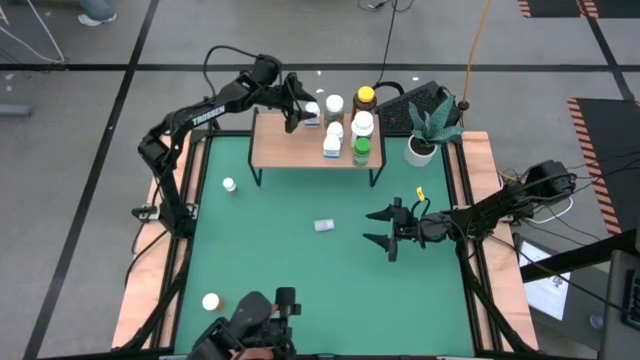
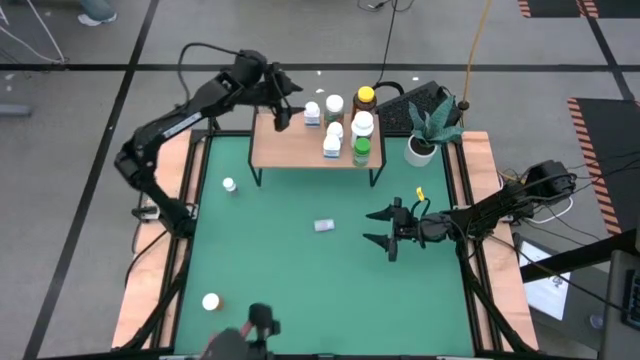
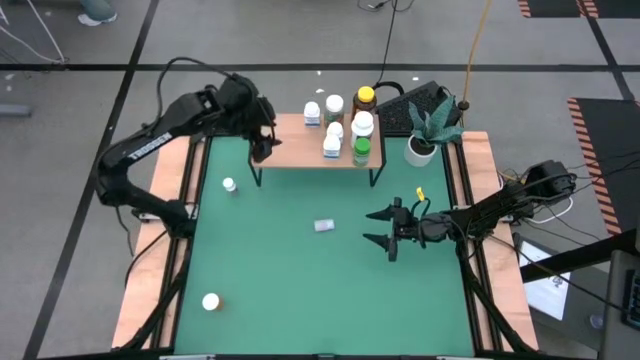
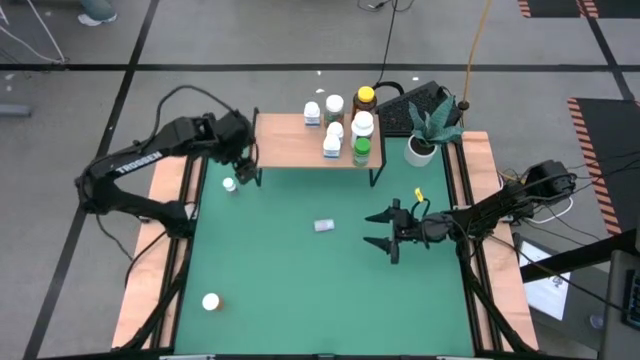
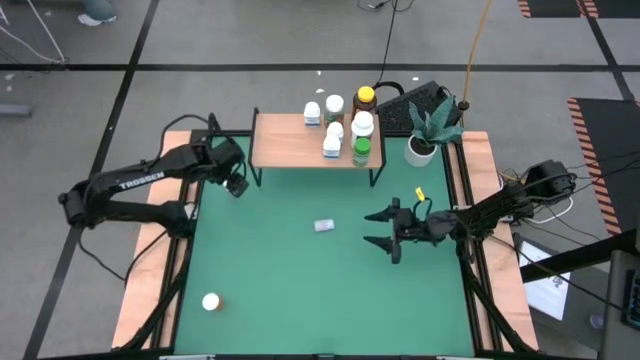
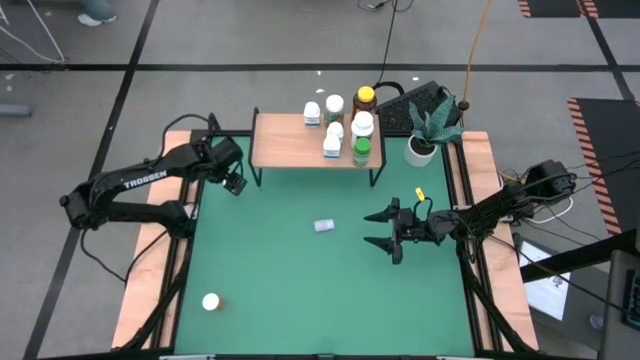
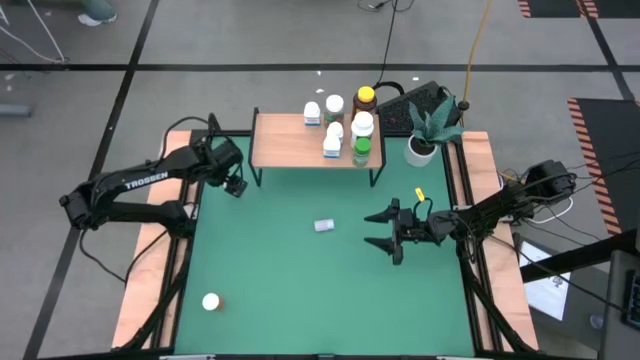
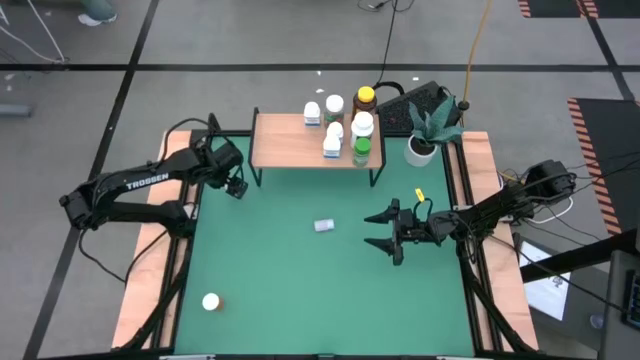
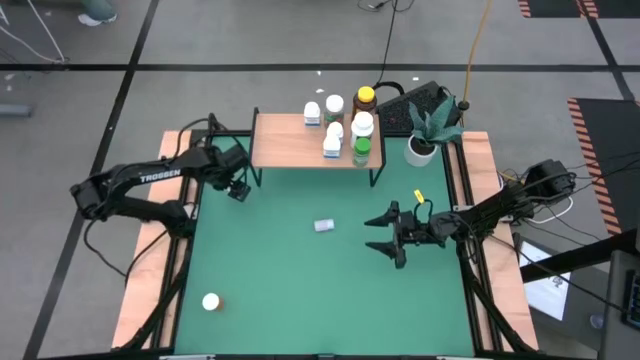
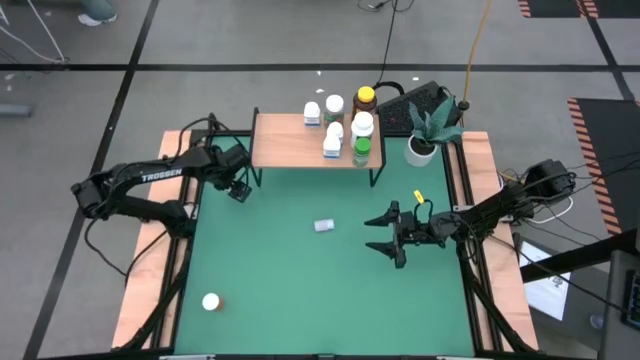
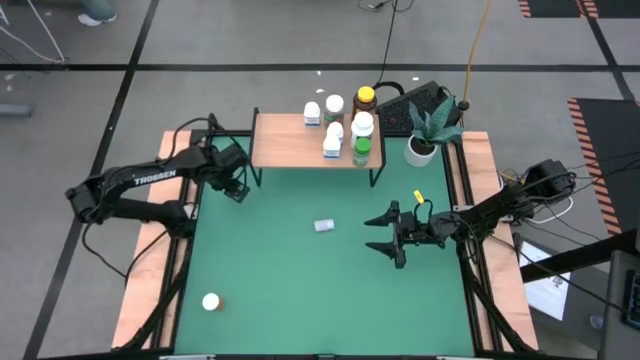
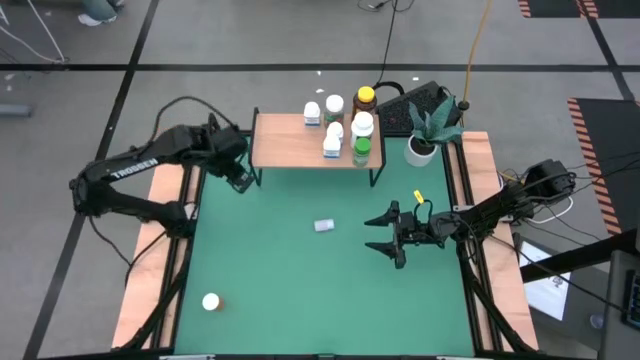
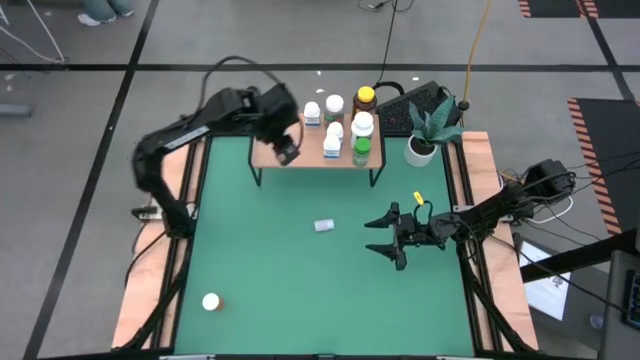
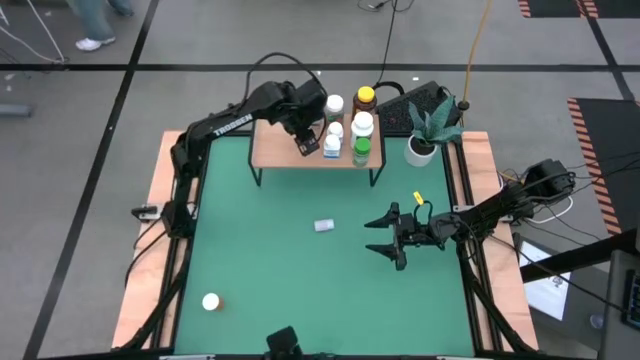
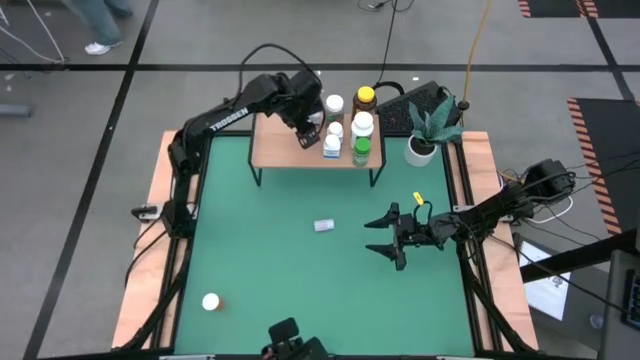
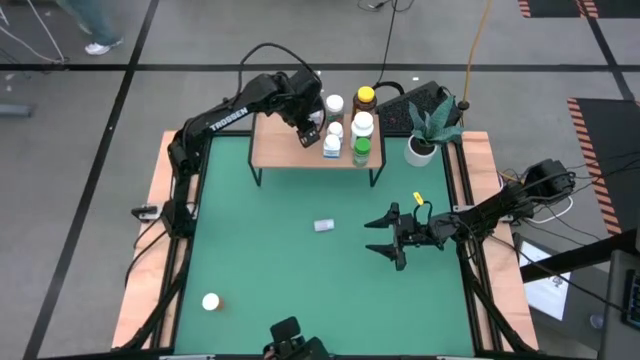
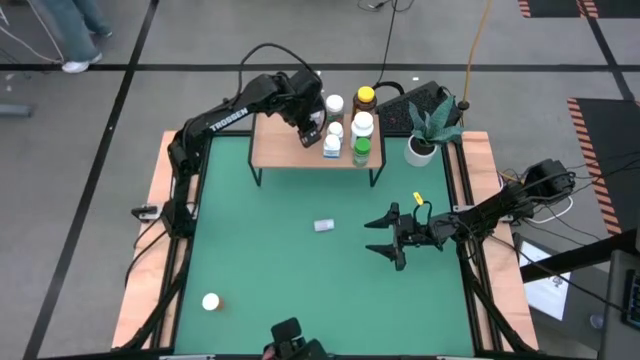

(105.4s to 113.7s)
Task: Pick and place medicine bottles onto shelf by color
Put the small white medicine bottle on the shelf

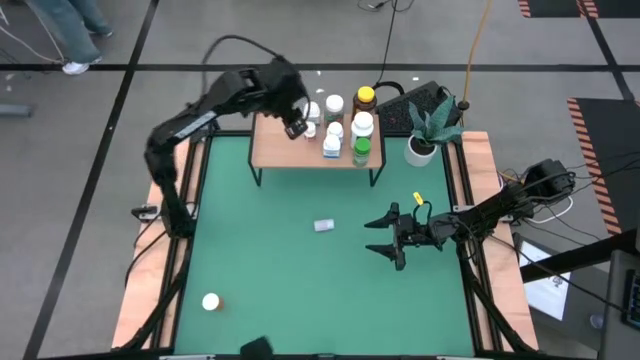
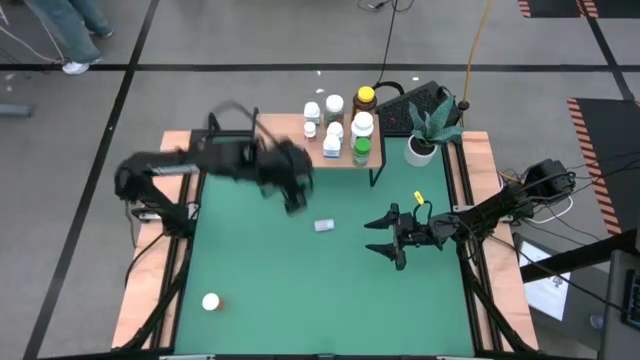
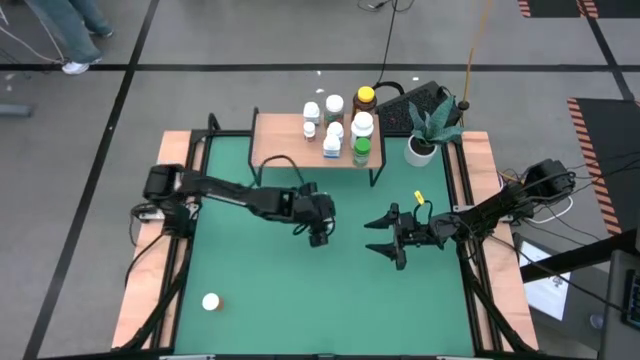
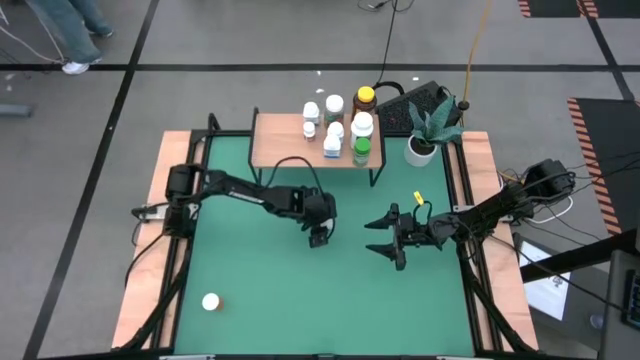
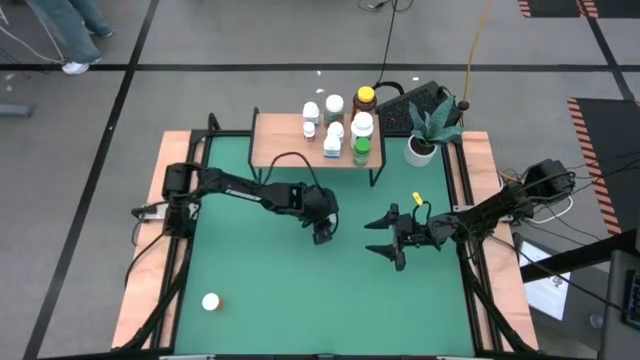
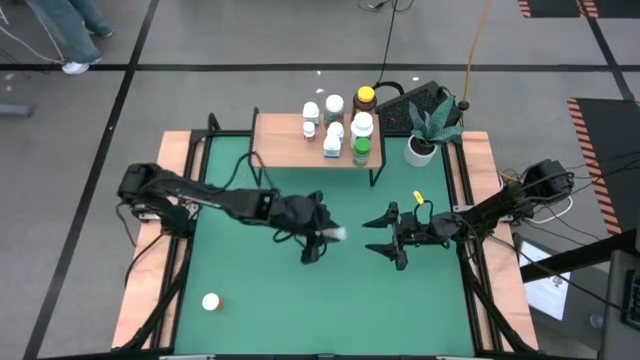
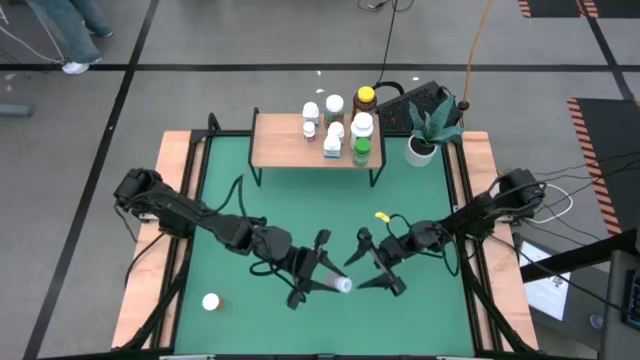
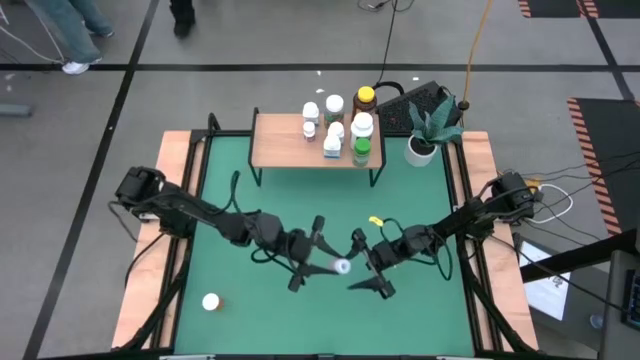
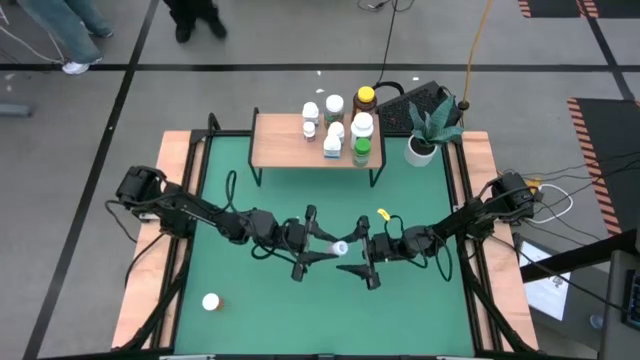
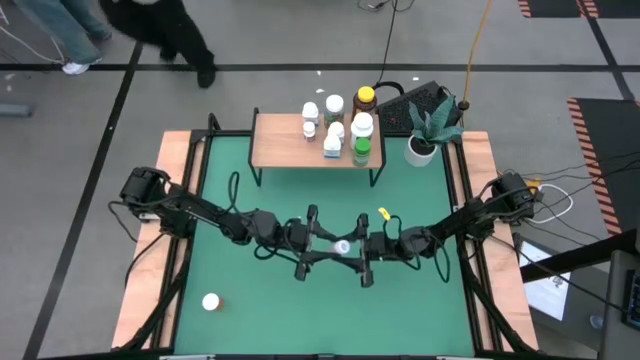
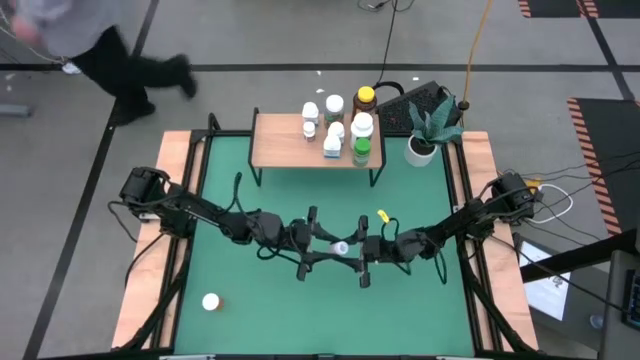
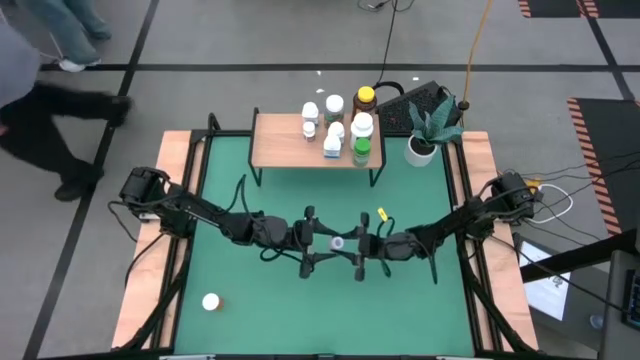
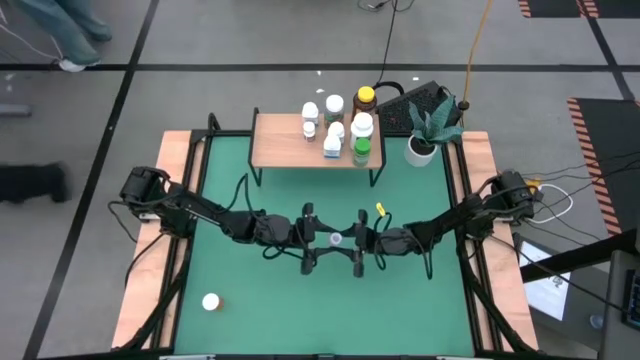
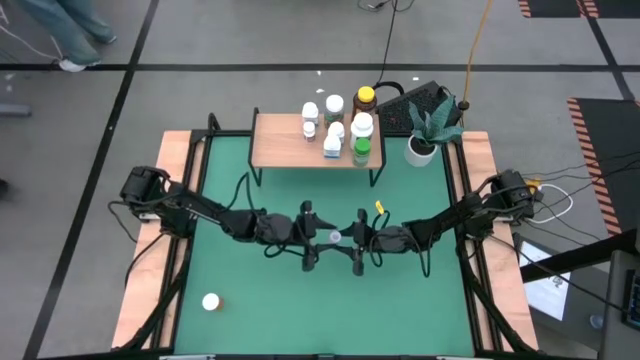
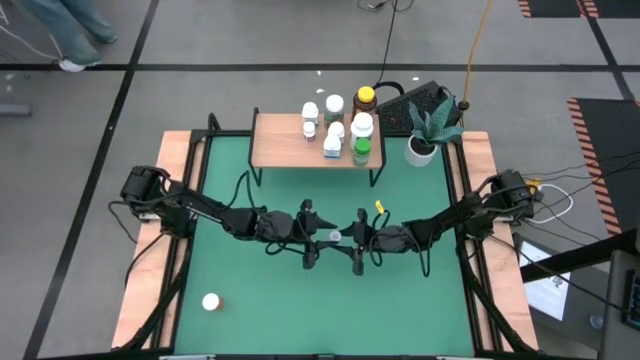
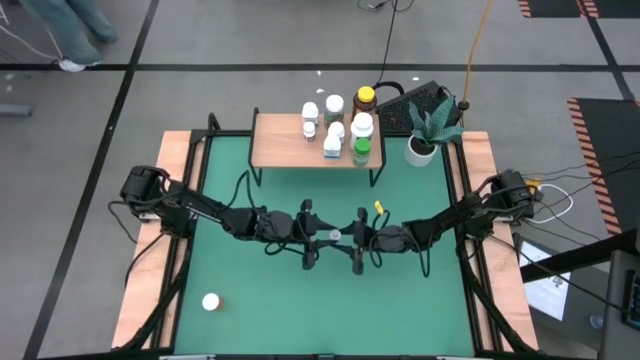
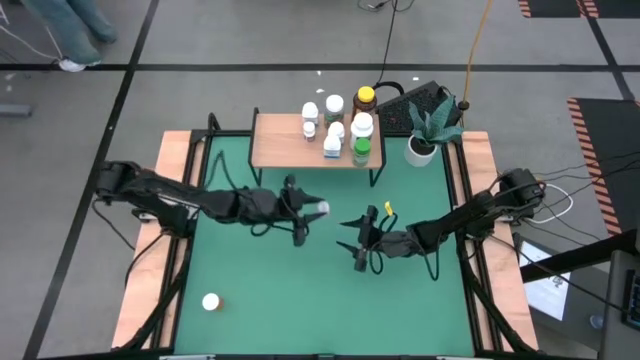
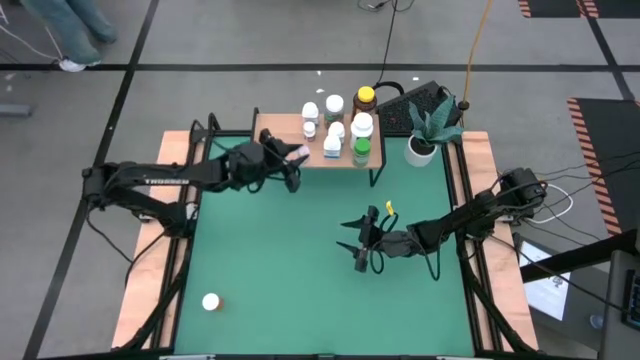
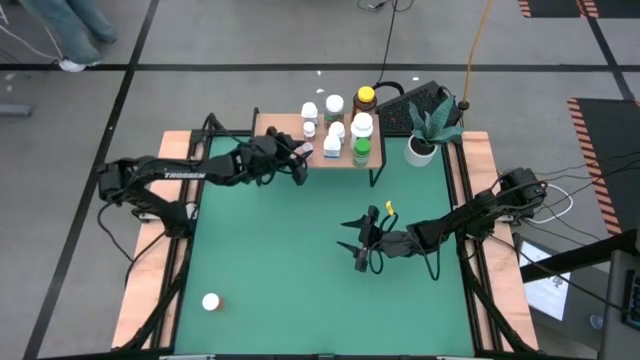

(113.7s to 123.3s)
Put the transparent pill bottle on the shelf
